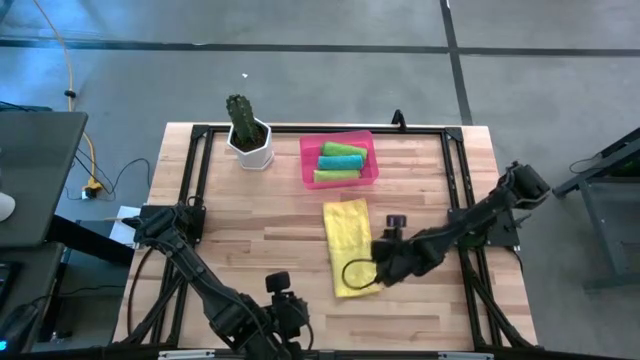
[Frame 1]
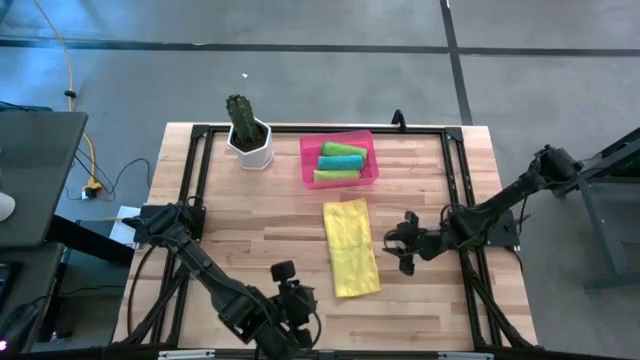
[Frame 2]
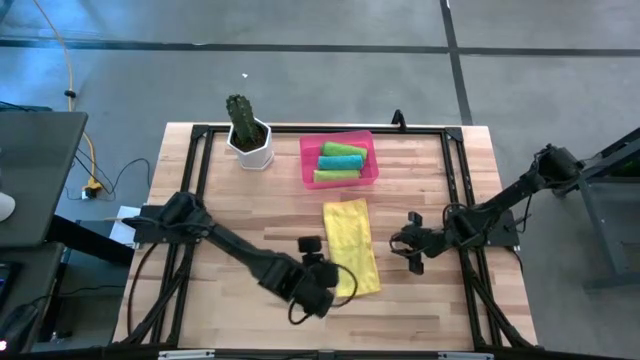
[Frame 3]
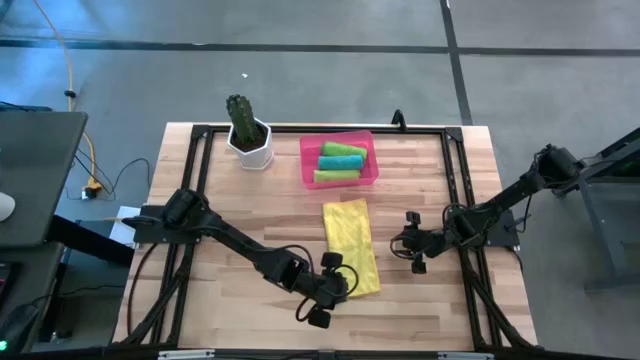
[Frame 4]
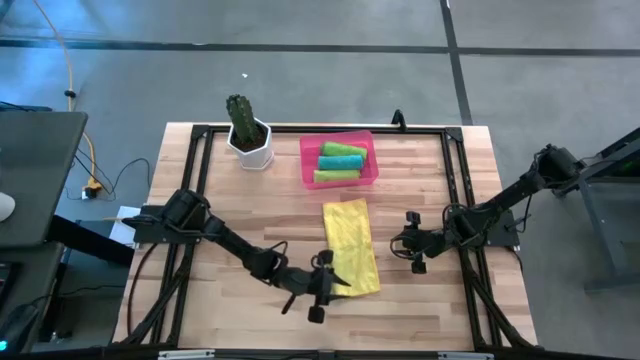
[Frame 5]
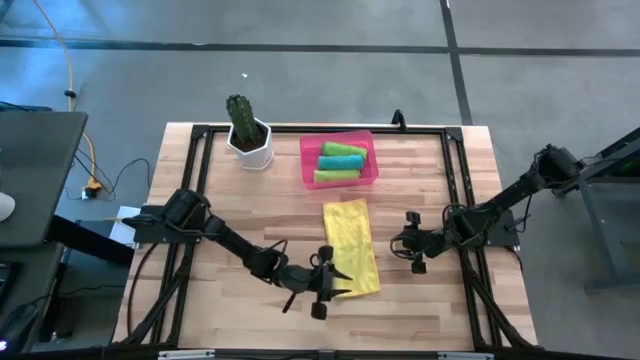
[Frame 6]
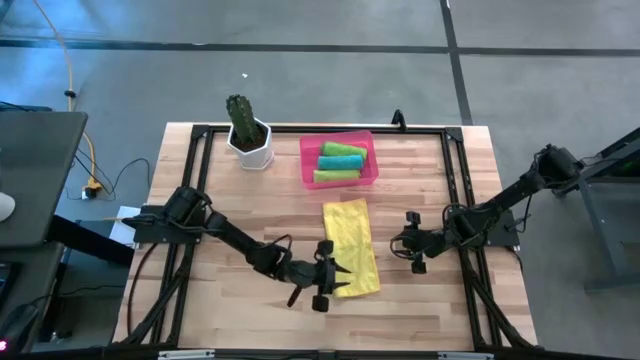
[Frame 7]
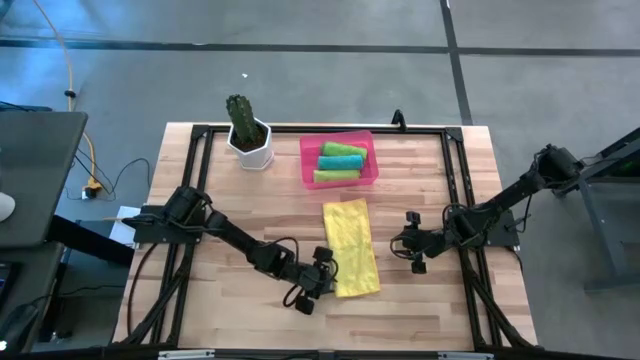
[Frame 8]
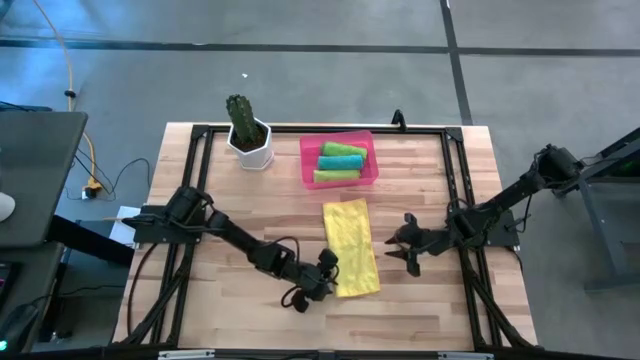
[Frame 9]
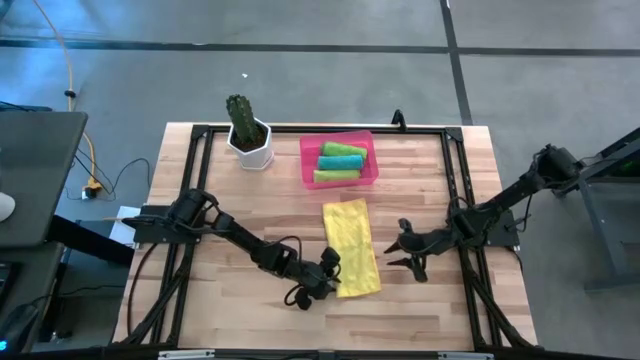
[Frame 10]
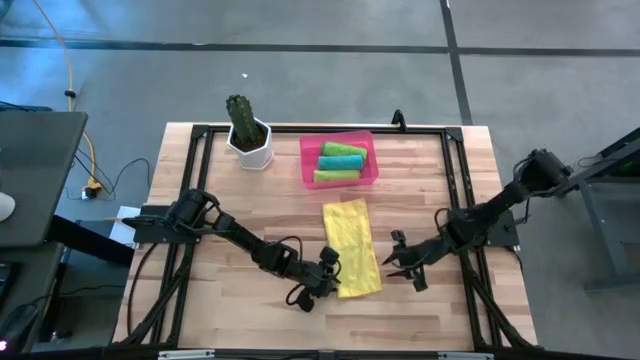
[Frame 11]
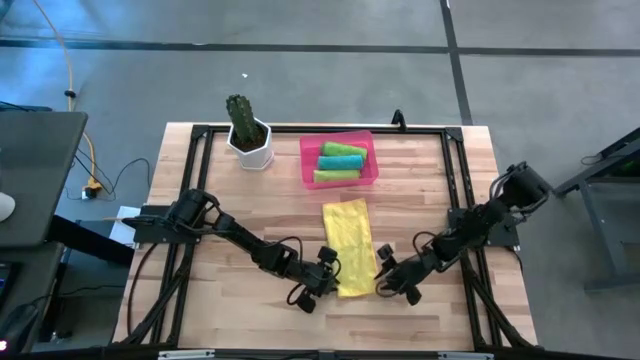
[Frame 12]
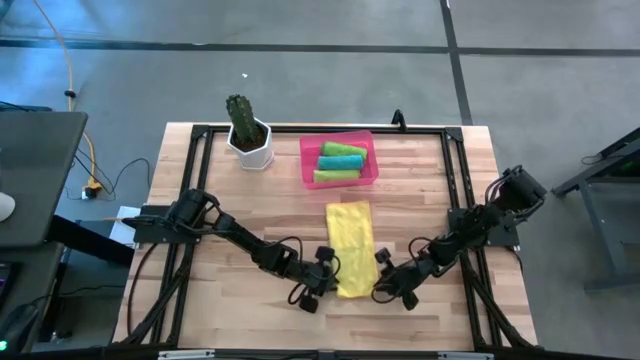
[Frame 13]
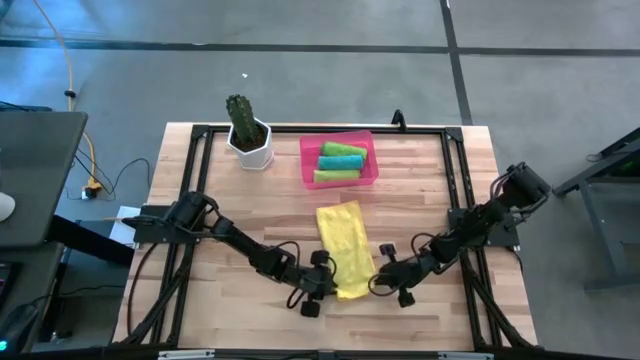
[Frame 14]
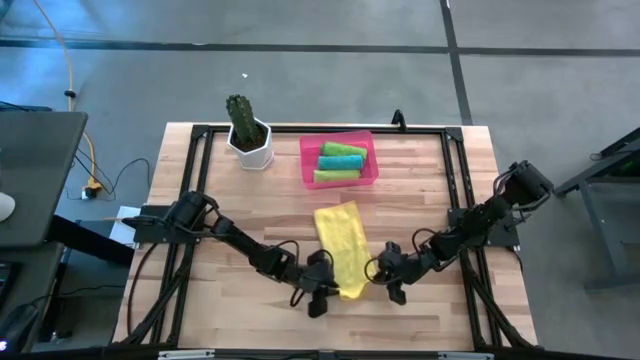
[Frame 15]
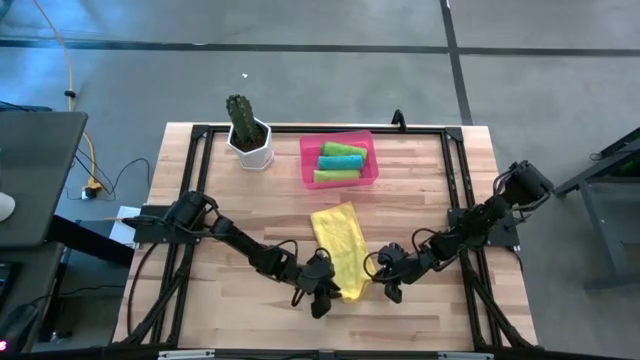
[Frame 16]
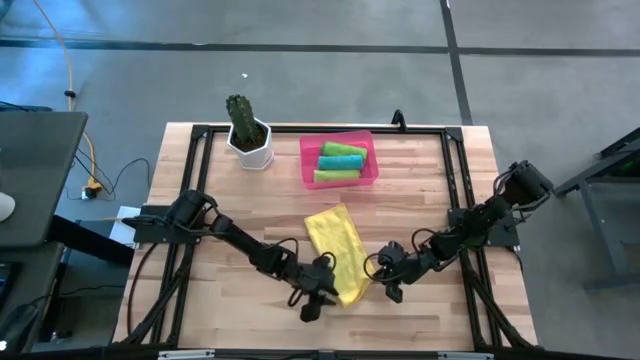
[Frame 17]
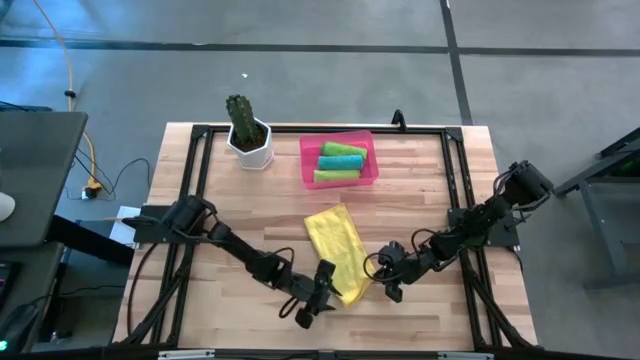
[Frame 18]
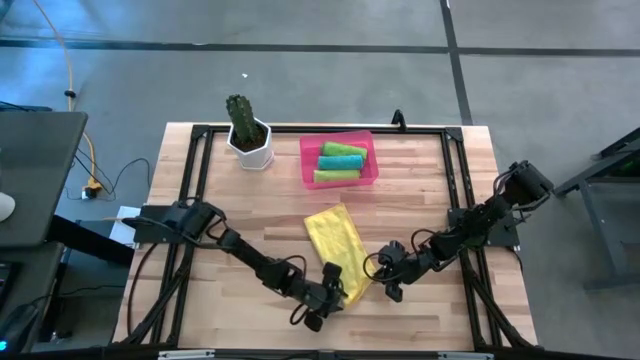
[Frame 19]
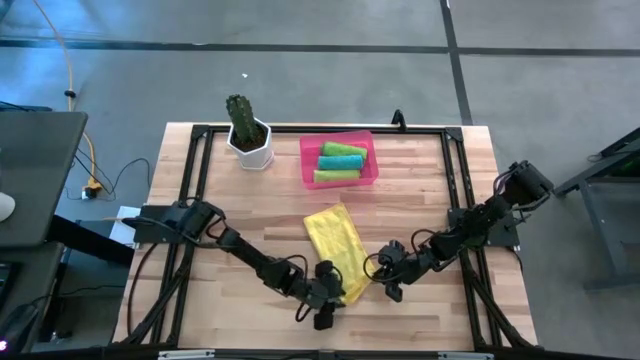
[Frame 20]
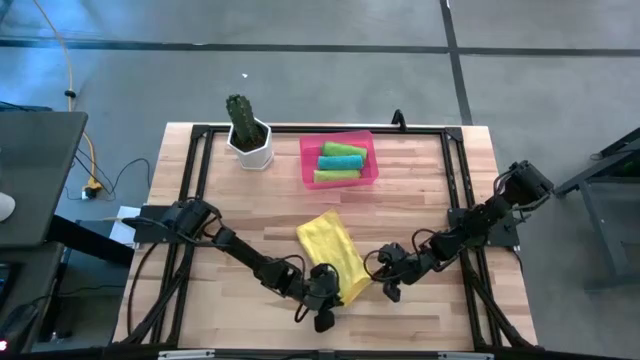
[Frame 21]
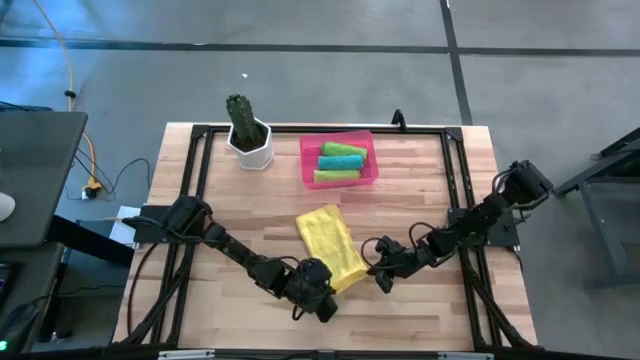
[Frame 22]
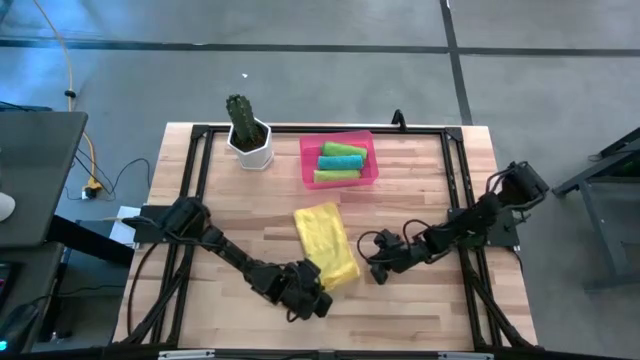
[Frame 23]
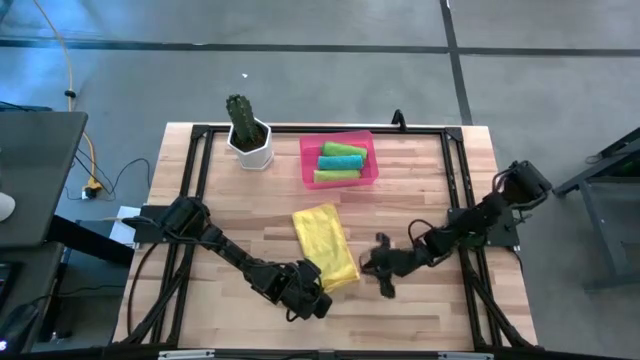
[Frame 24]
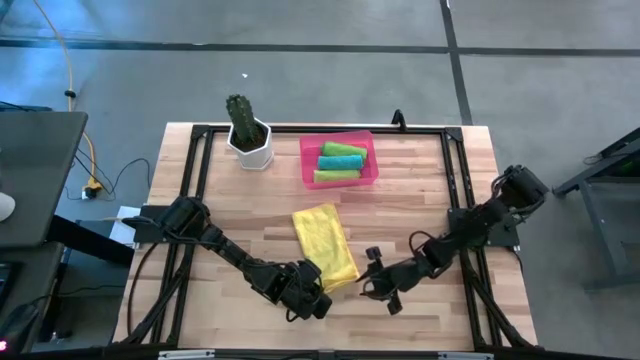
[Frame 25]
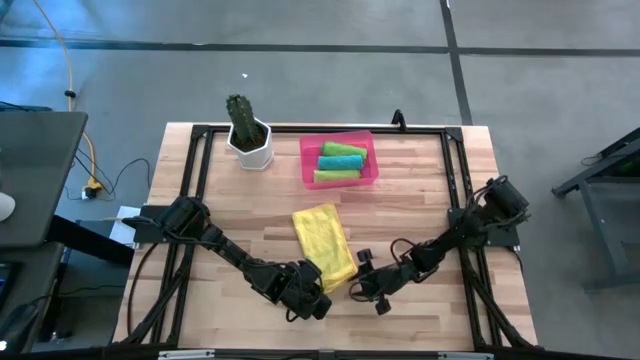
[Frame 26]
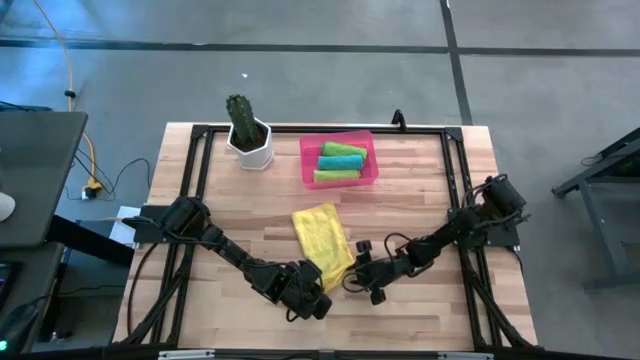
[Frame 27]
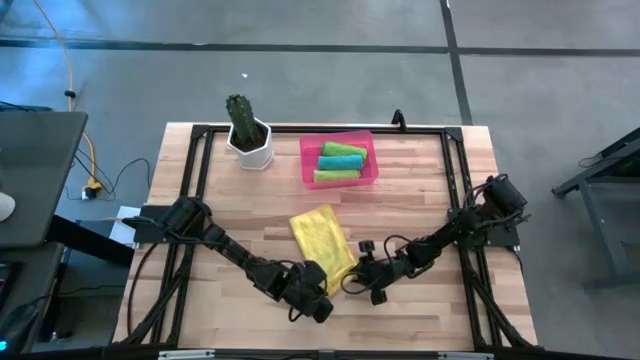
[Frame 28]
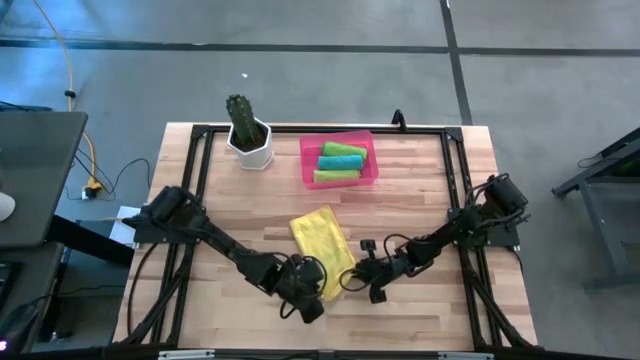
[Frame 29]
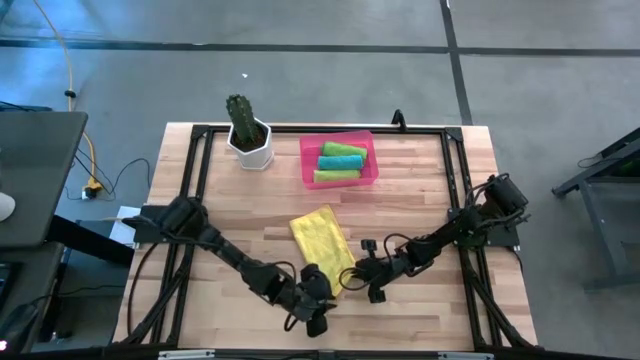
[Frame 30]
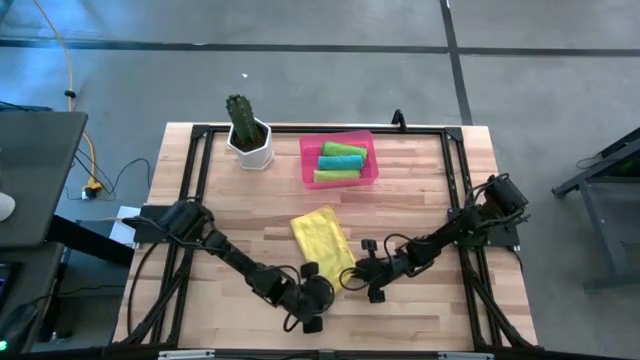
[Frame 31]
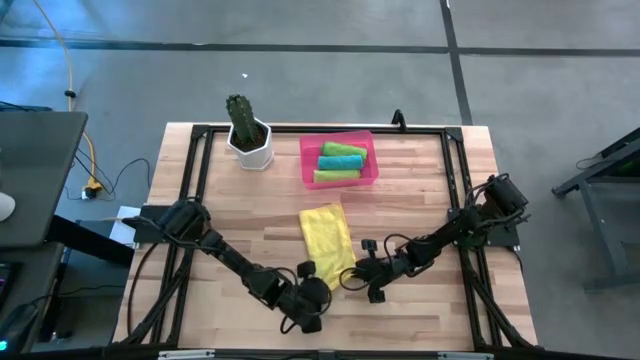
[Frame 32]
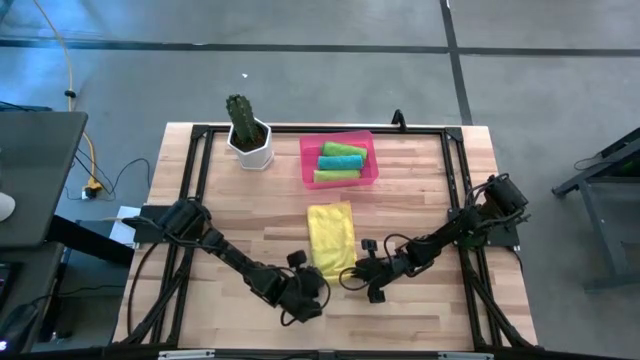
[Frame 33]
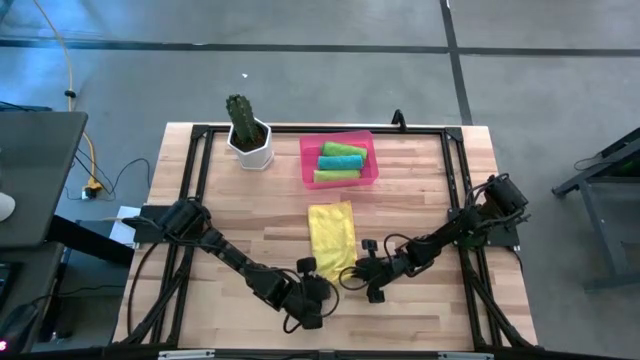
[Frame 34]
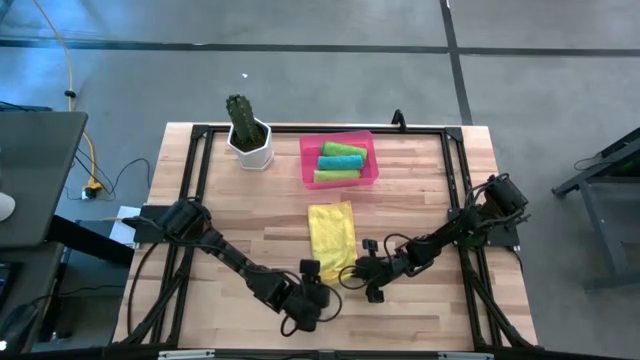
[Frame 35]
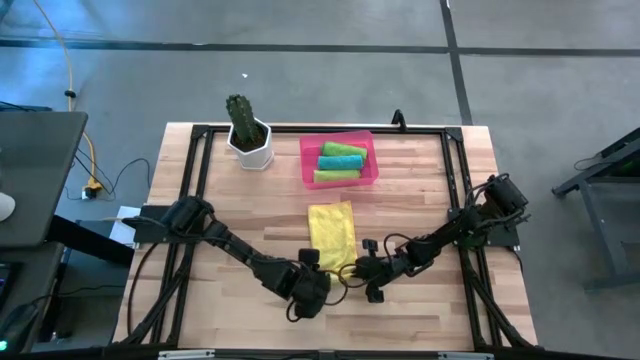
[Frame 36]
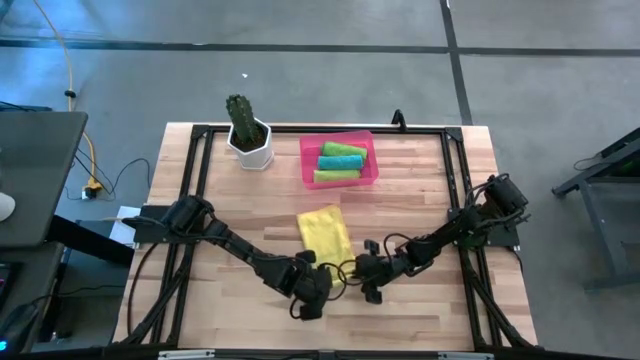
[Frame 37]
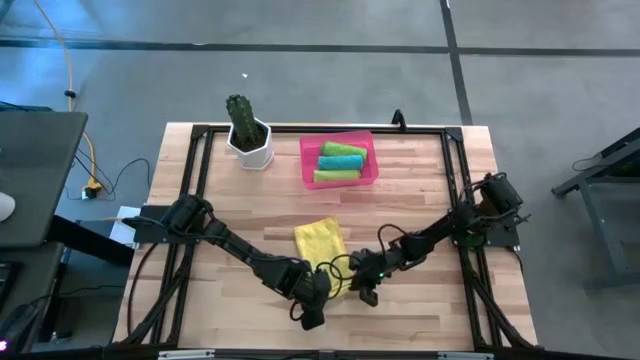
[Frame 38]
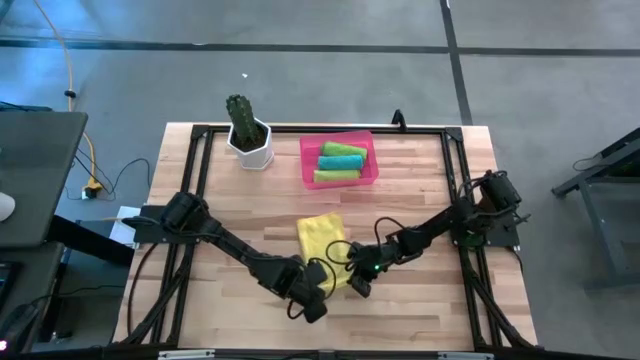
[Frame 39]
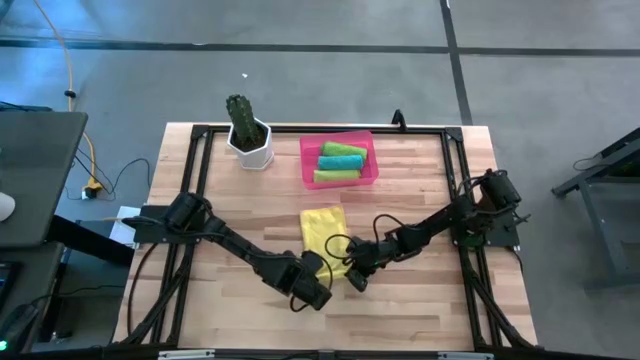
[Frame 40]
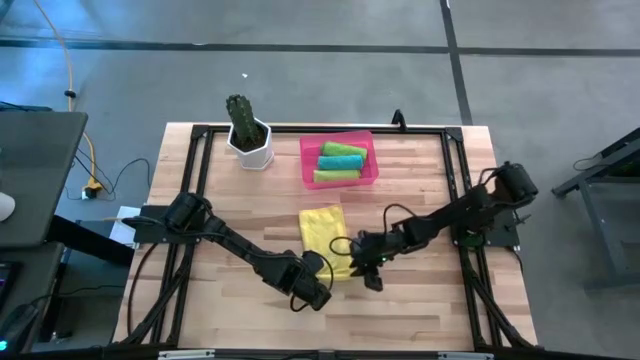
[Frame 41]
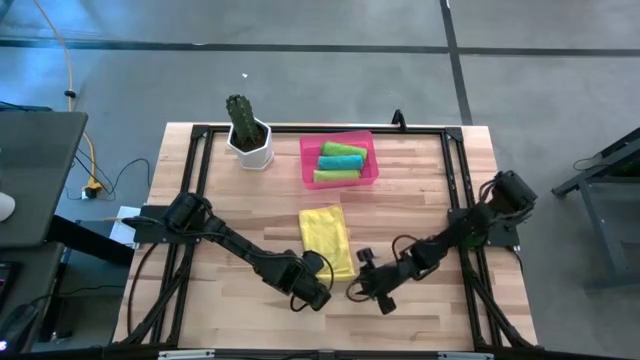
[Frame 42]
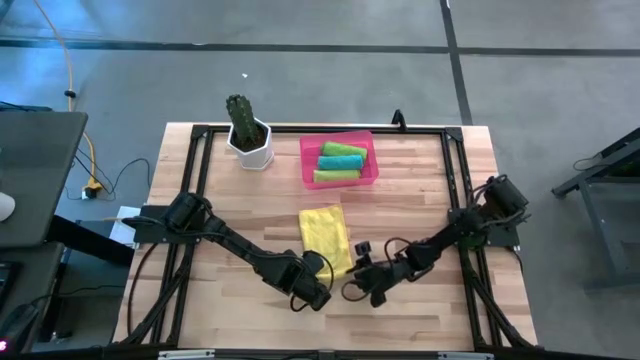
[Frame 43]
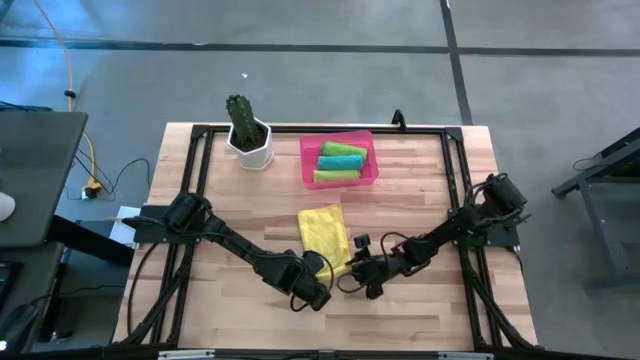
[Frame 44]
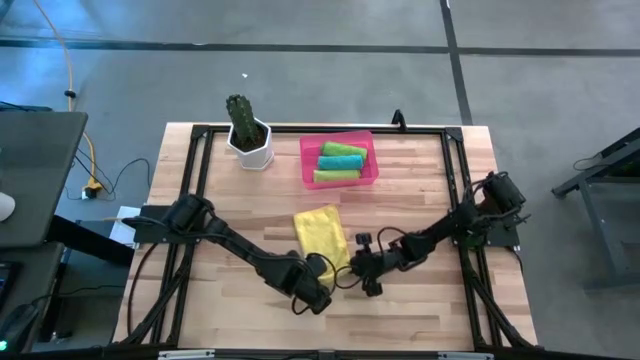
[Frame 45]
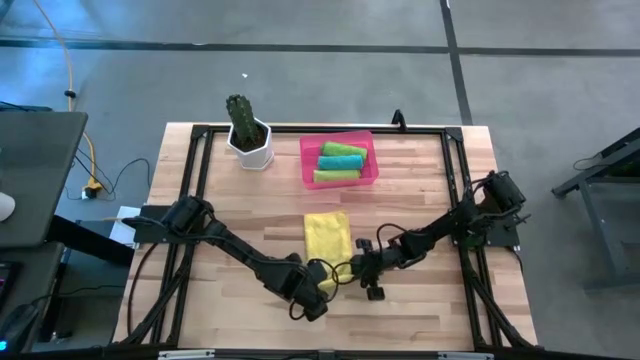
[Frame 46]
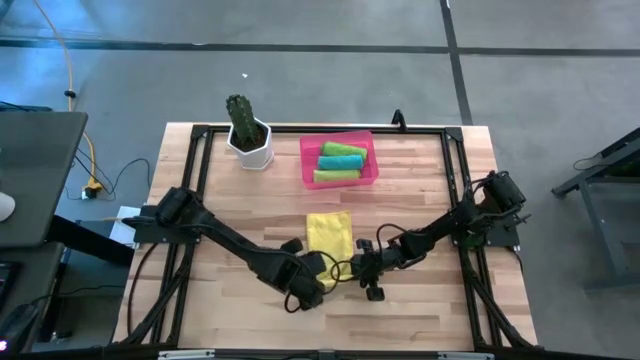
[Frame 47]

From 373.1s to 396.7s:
Task: Roll microfiber towels into tight, uniform cylinder then place into a basket
Roll the yellow microfiber cloth
